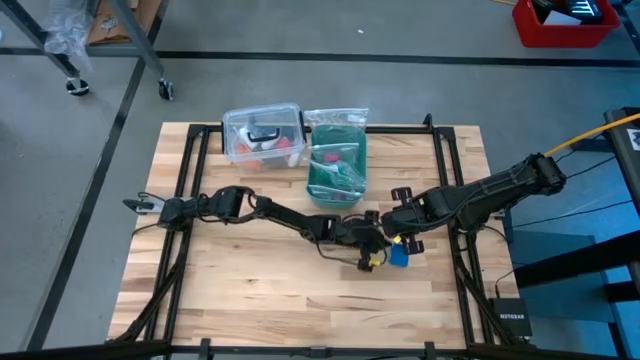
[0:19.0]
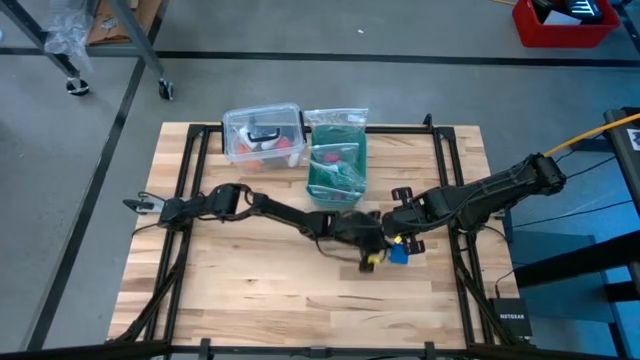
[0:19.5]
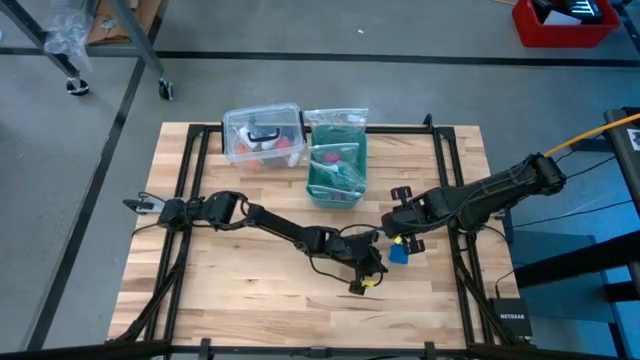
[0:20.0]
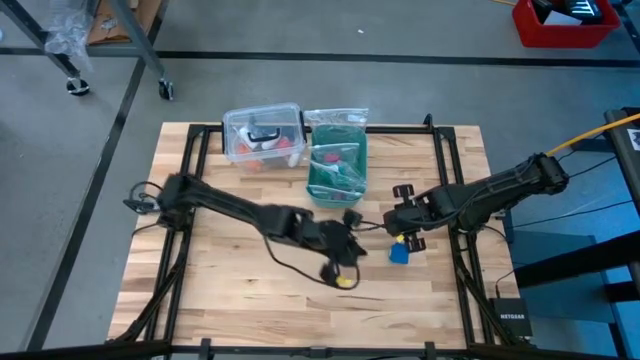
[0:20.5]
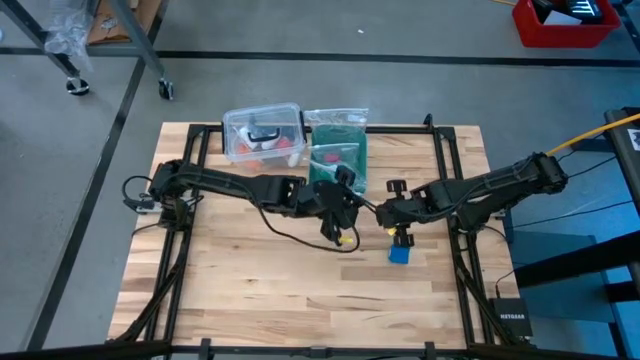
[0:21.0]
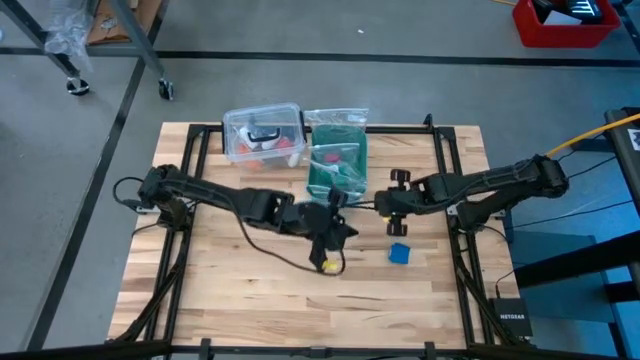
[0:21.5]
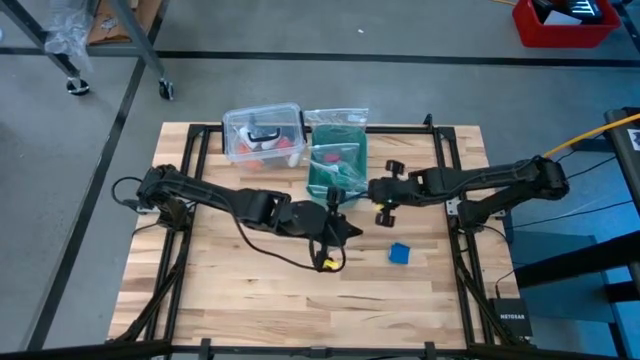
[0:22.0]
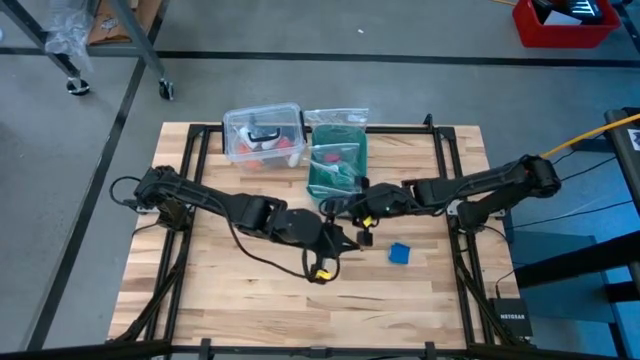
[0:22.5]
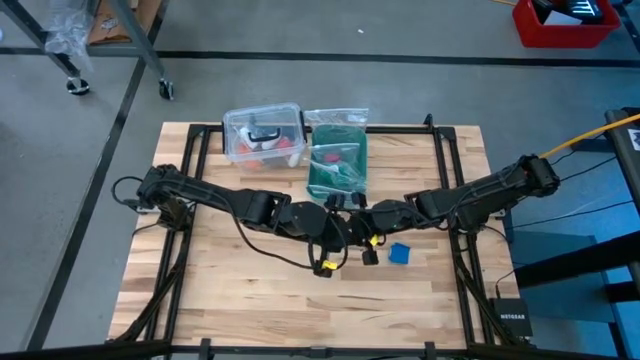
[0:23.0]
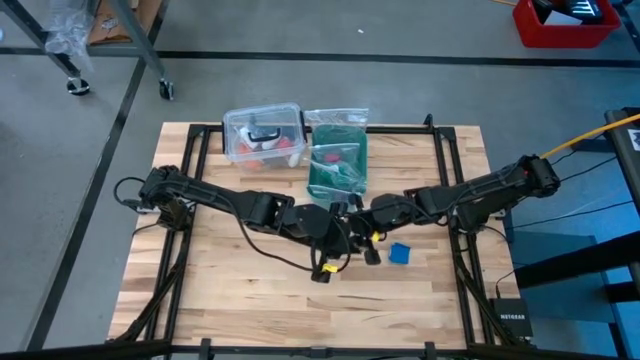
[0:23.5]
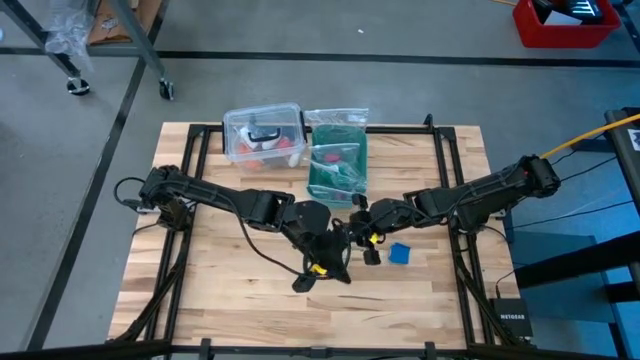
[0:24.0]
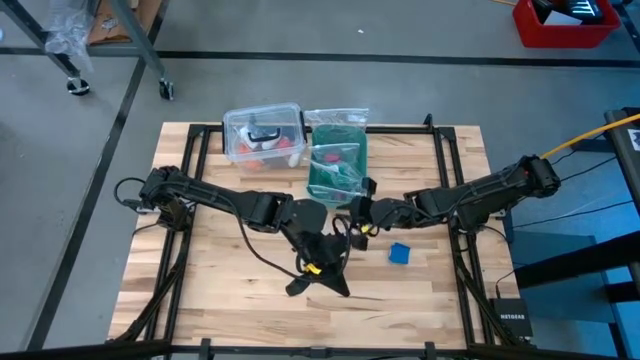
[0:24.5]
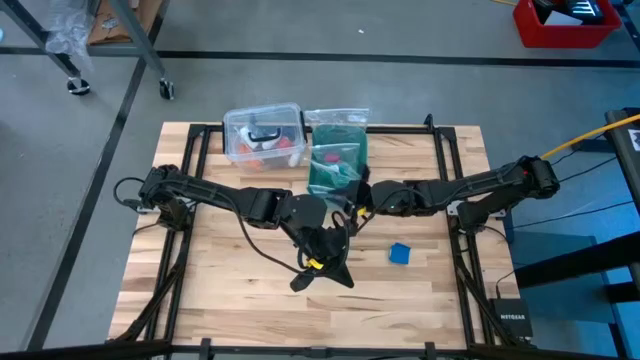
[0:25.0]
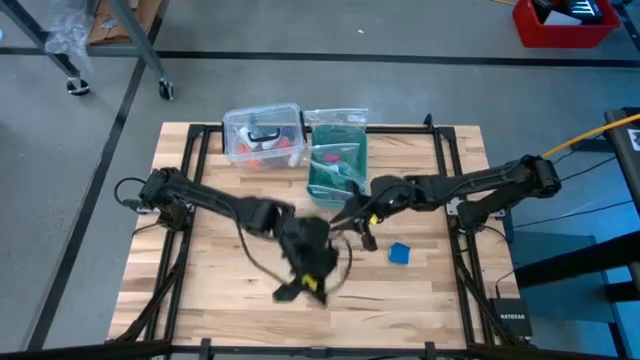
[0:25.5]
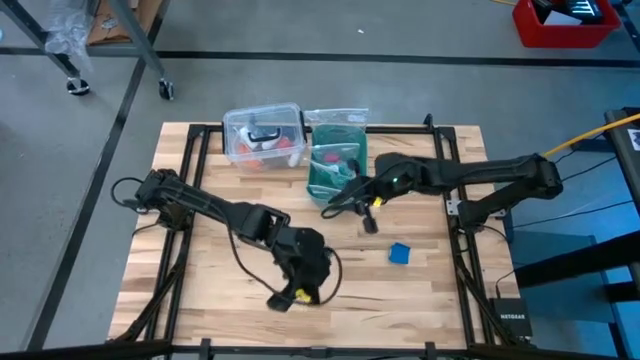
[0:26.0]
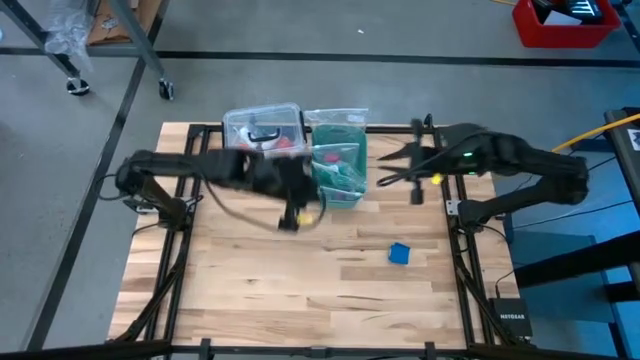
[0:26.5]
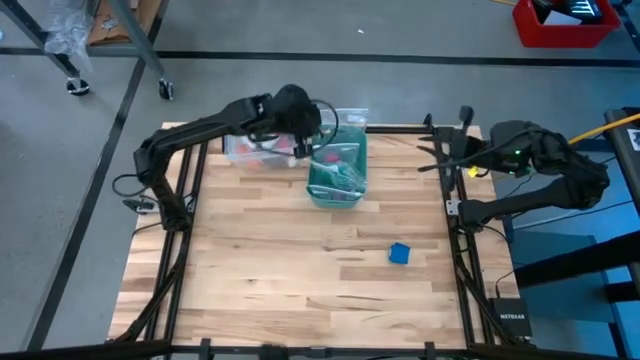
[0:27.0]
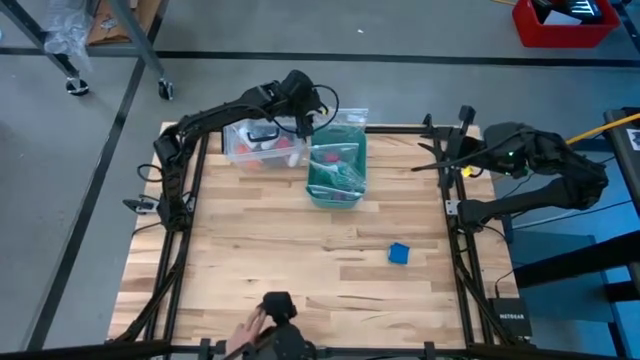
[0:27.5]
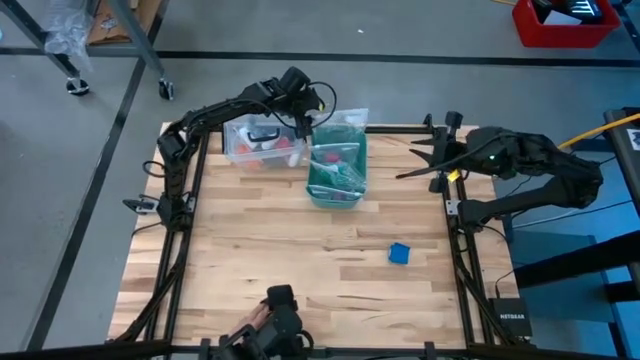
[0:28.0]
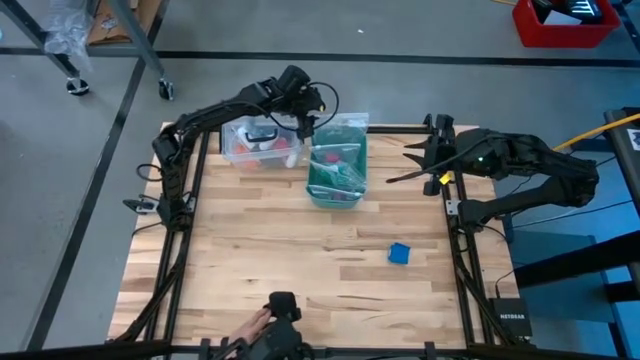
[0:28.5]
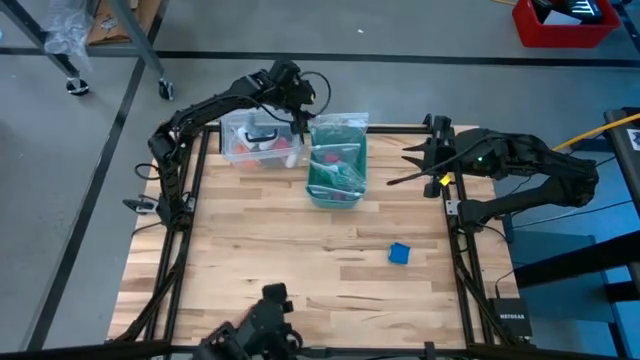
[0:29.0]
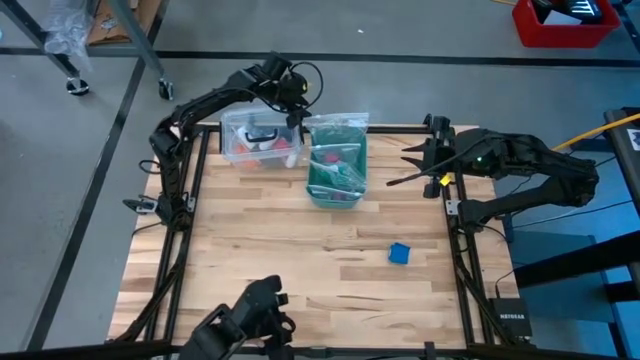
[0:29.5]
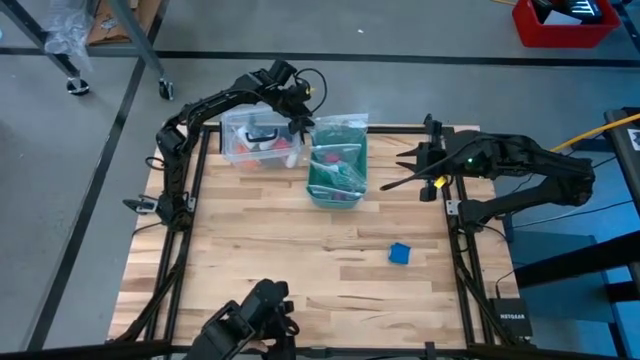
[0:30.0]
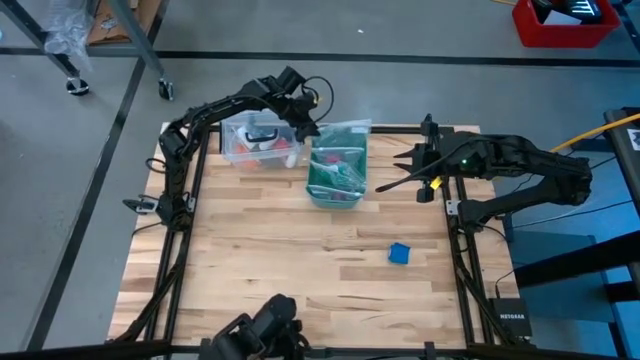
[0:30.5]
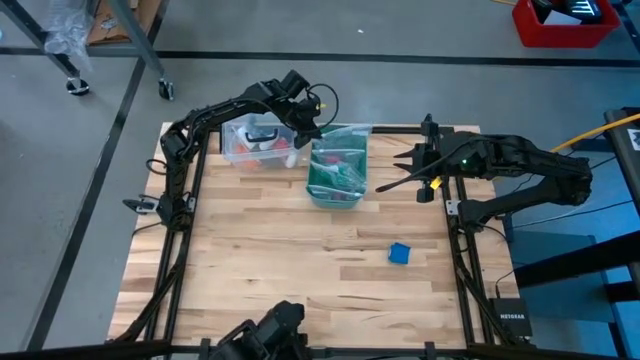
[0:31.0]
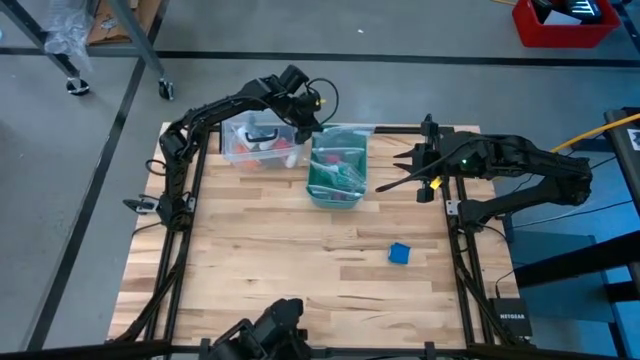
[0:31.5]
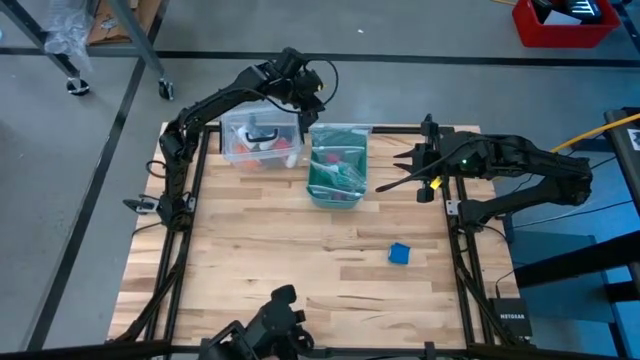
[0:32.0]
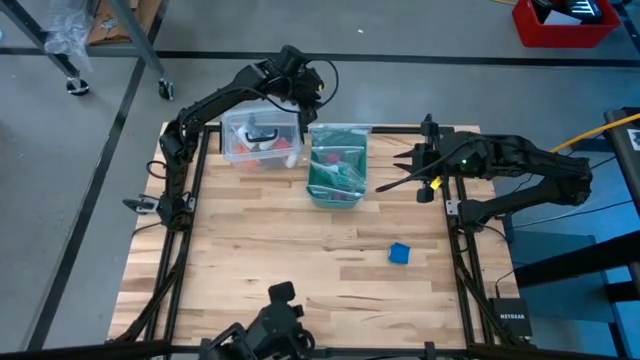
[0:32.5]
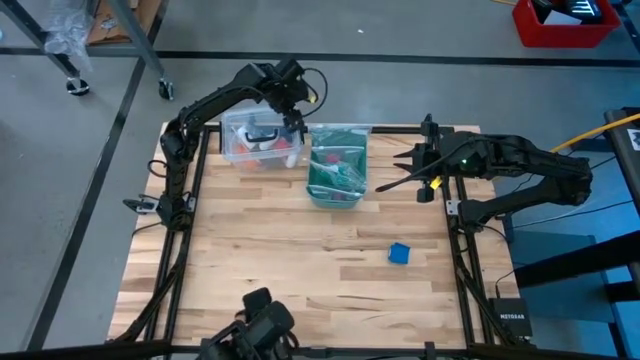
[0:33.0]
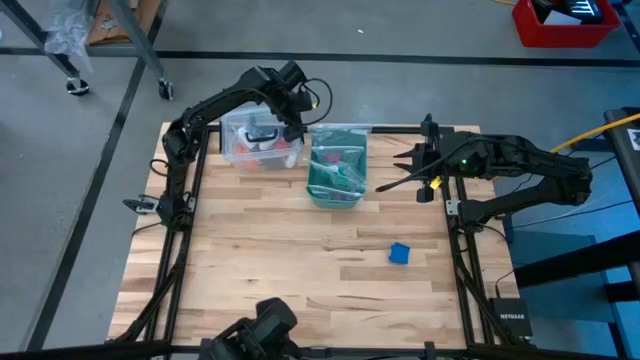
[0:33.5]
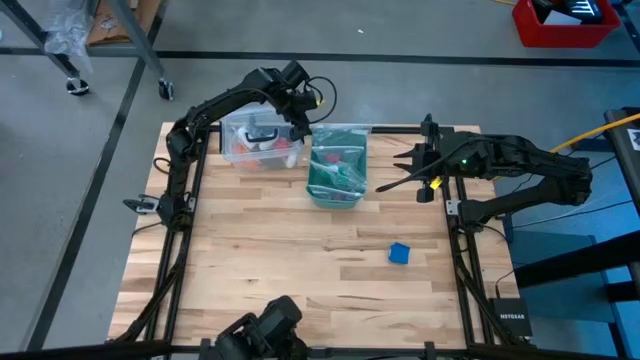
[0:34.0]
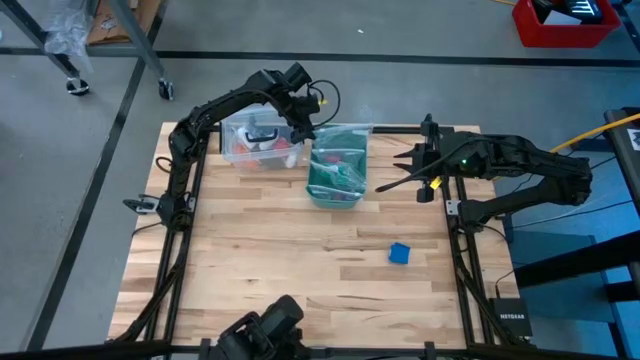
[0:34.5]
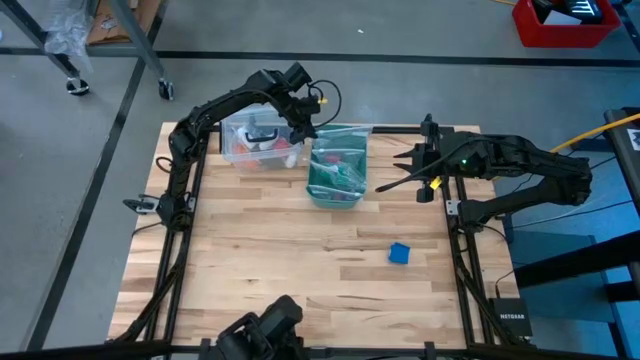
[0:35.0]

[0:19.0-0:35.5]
Task: Roll bandage
Open the transparent zip bag
